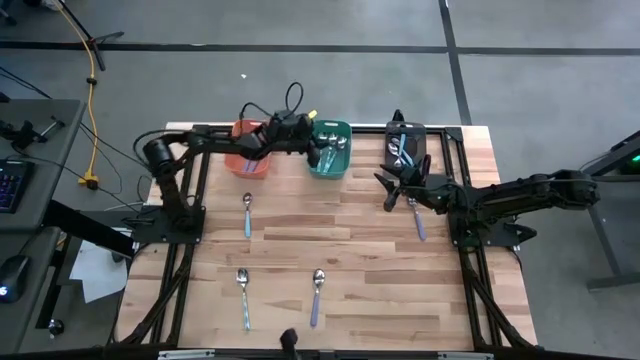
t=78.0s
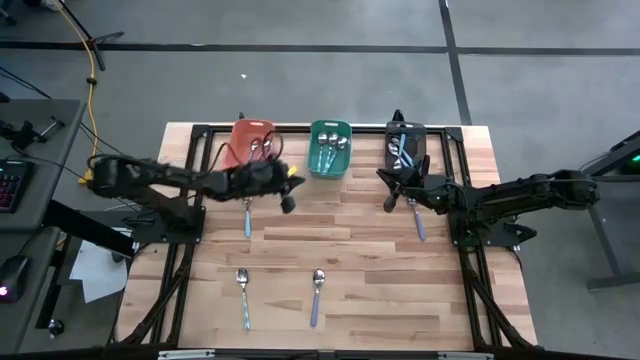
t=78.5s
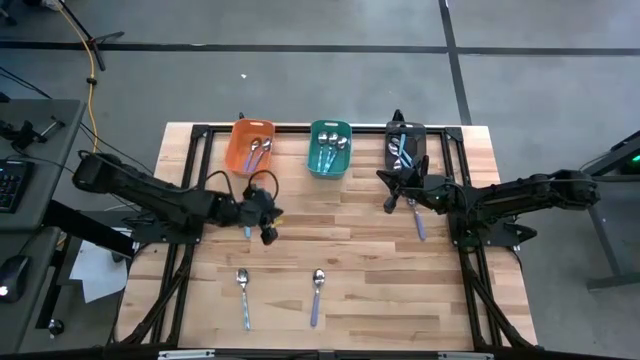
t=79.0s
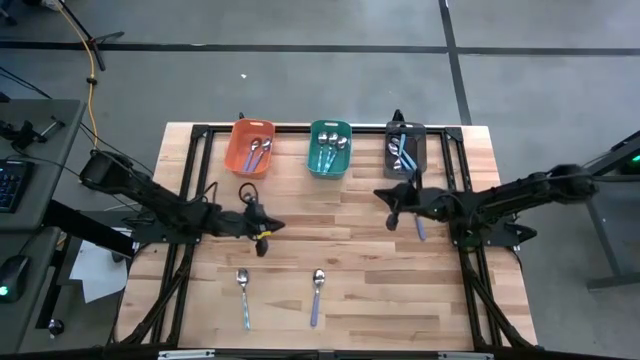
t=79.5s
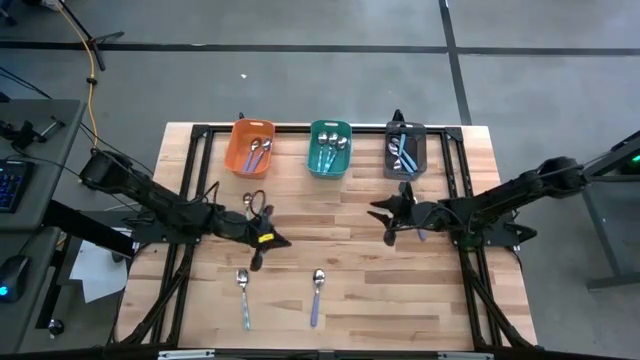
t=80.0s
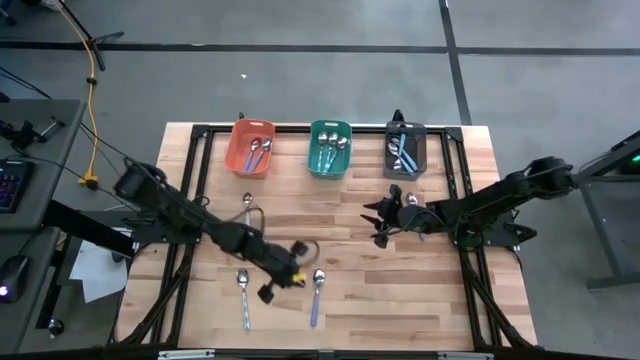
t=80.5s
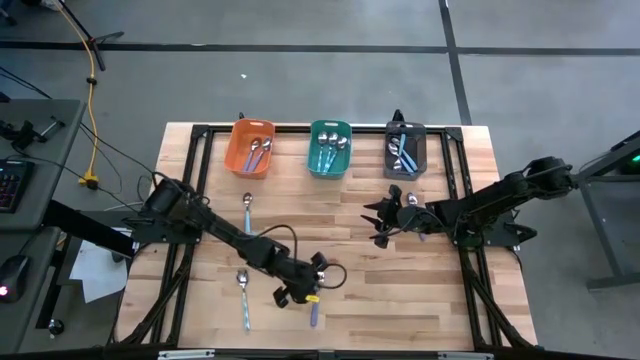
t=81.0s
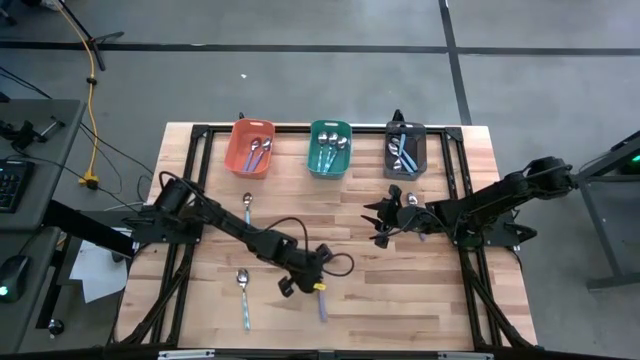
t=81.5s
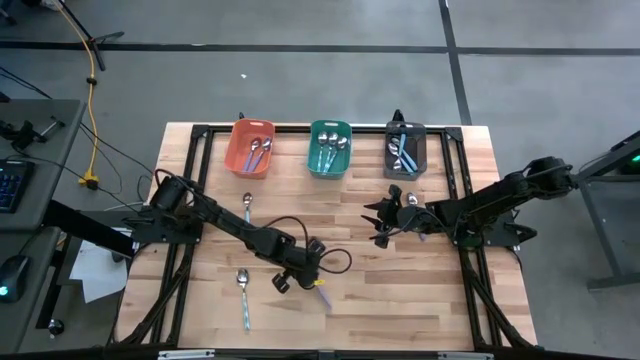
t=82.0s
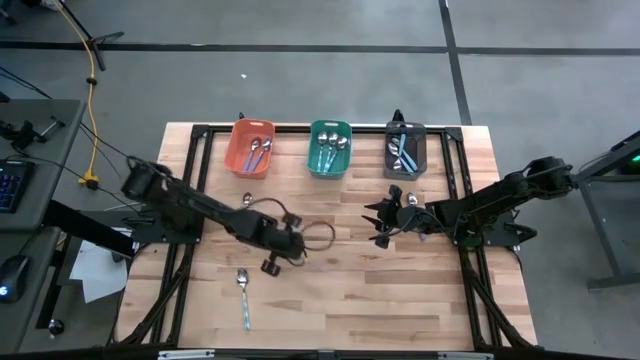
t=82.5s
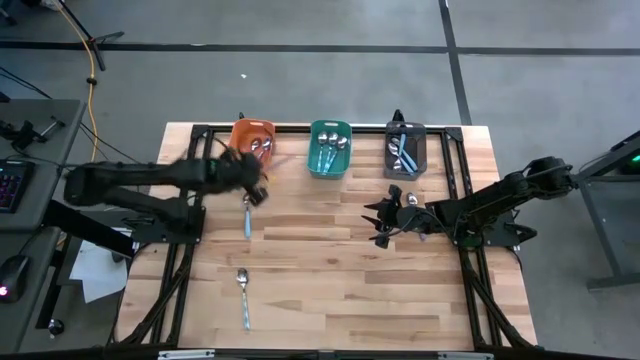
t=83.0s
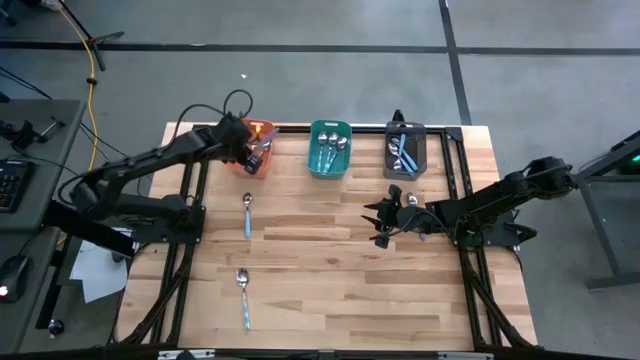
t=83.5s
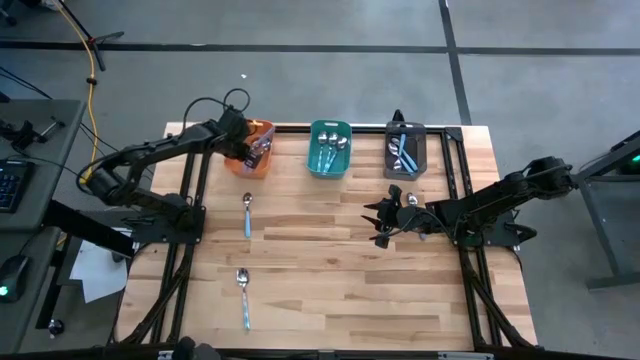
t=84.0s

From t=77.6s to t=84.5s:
Task: Sort silverware by color (type)
Put the purple spoon into the orange bin

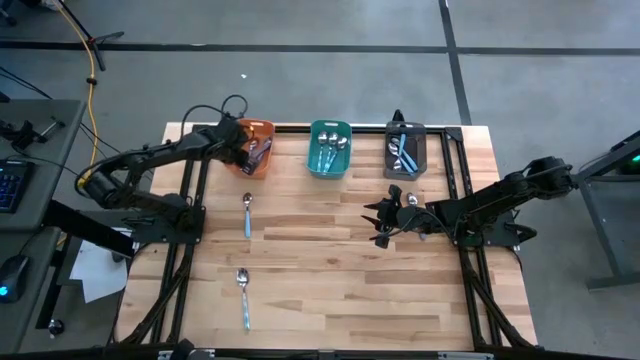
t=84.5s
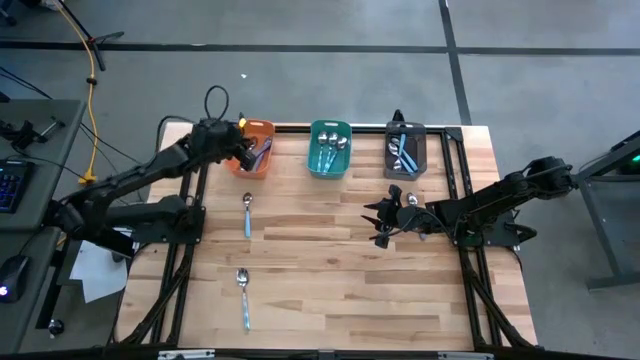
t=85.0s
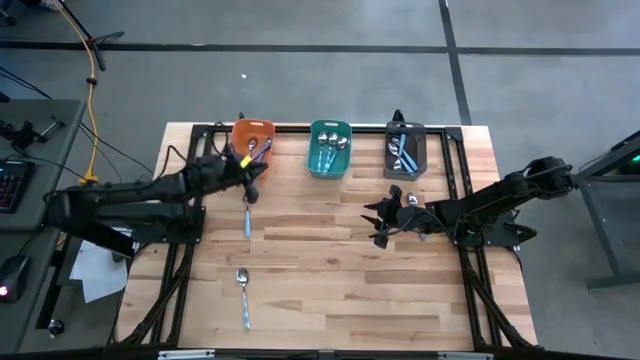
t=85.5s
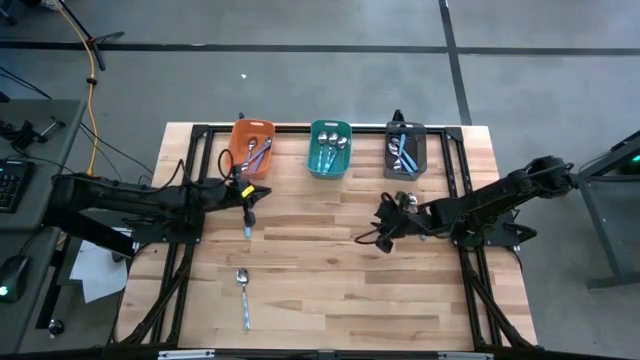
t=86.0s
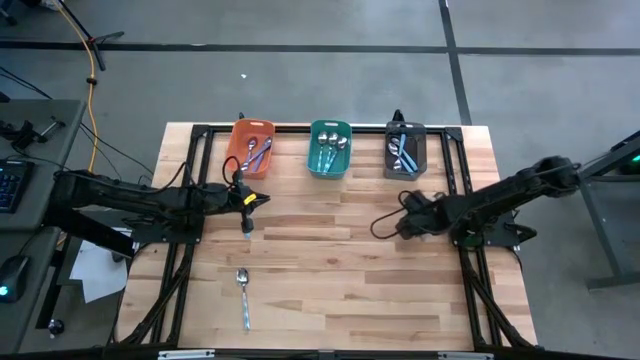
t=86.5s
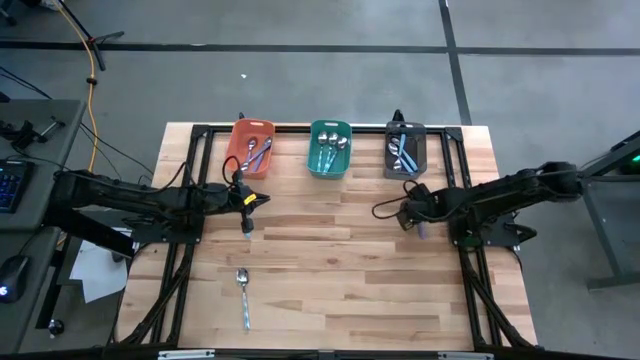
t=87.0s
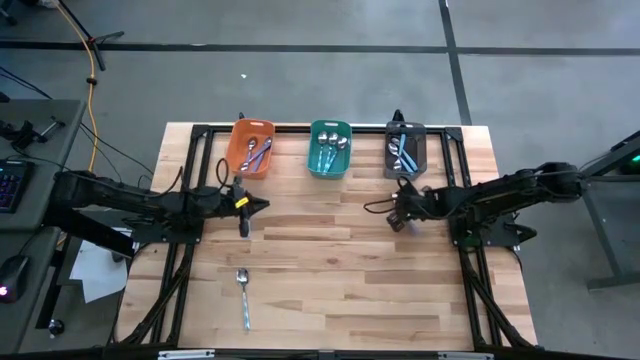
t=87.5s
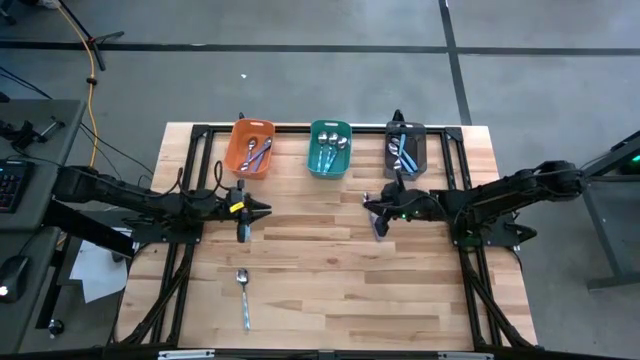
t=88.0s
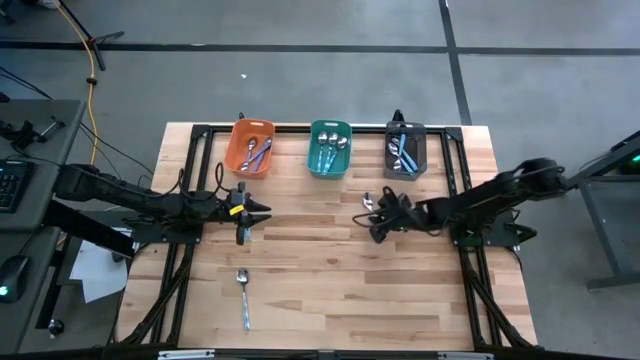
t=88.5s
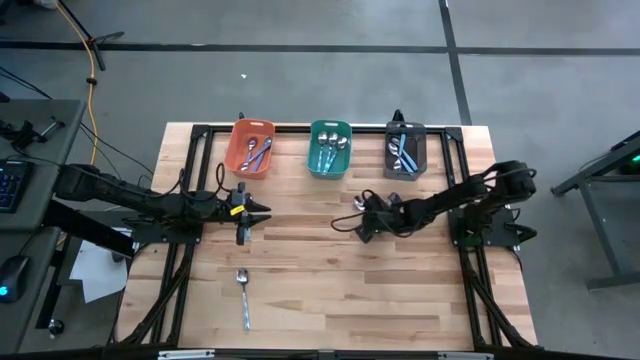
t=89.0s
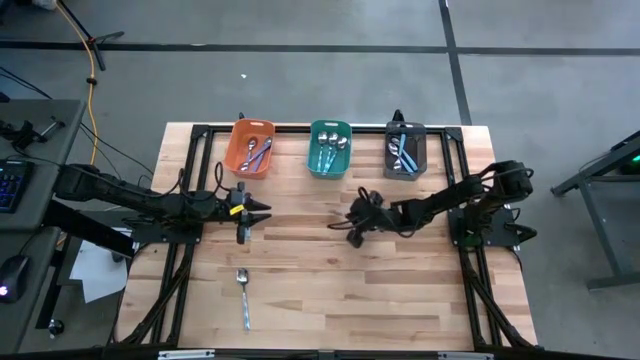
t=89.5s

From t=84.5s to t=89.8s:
Put the purple spoon into the orange bin

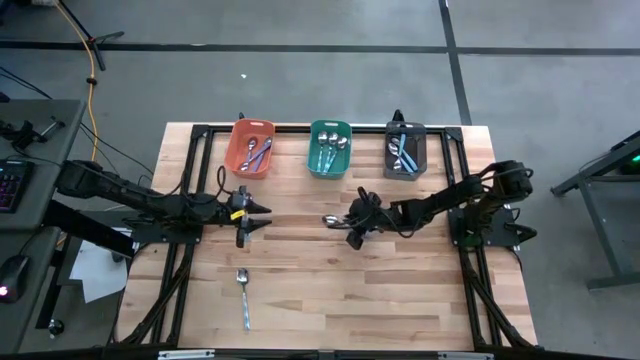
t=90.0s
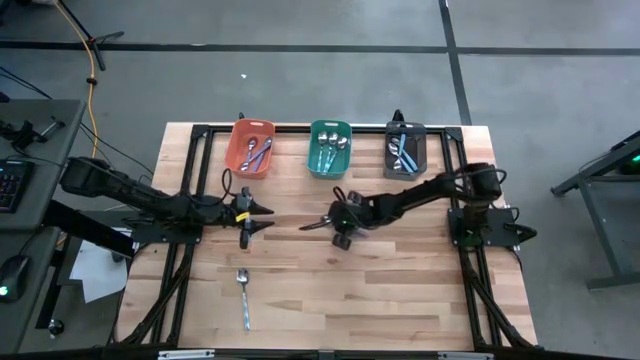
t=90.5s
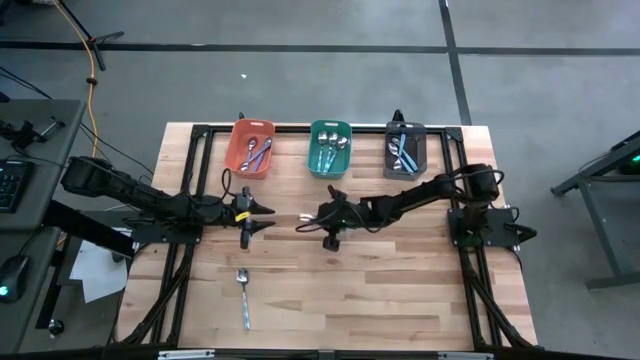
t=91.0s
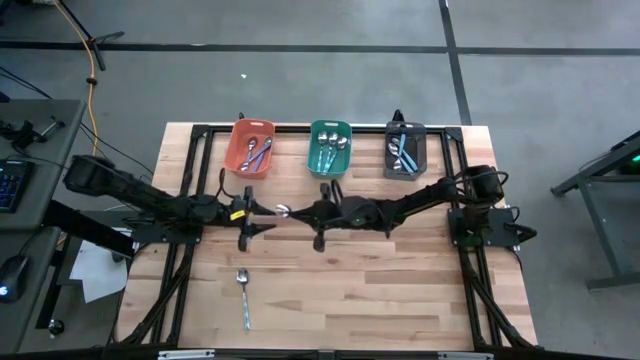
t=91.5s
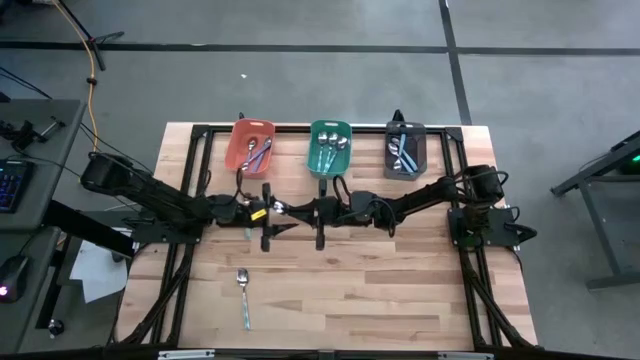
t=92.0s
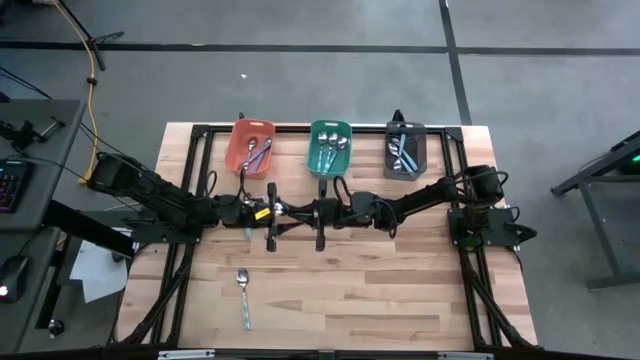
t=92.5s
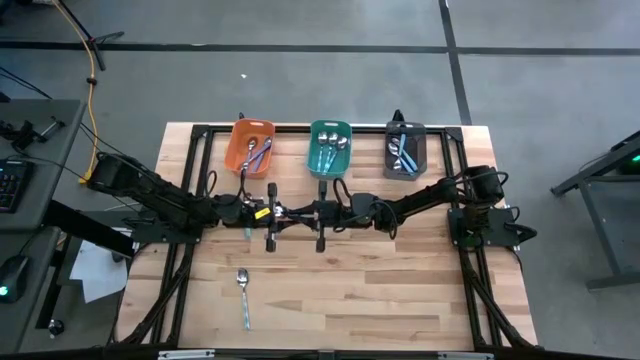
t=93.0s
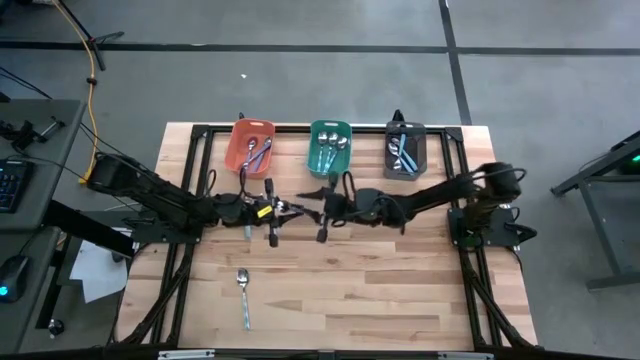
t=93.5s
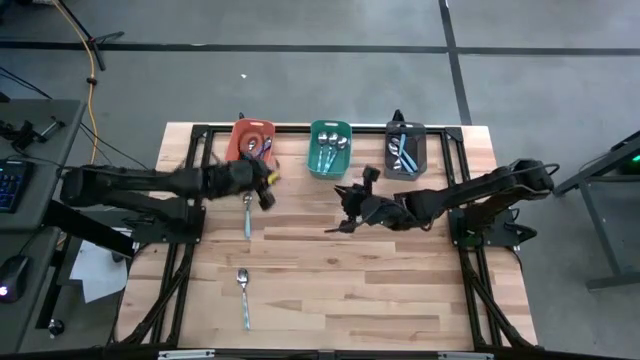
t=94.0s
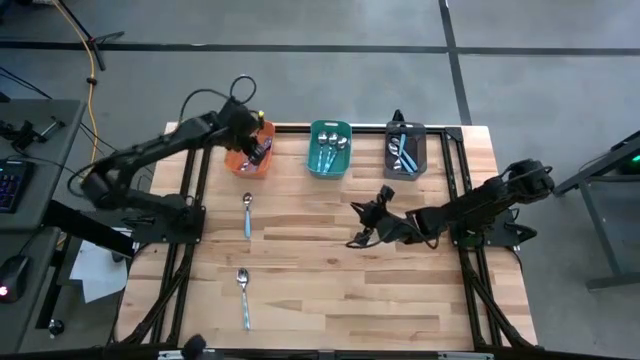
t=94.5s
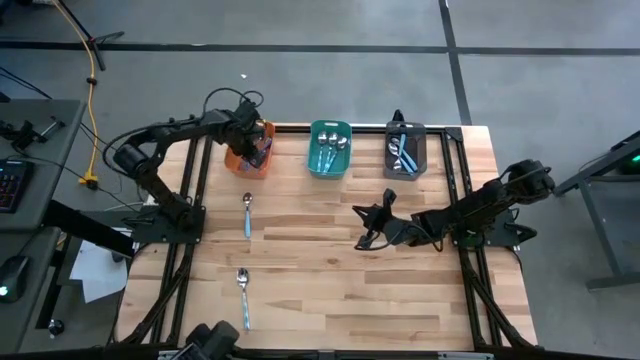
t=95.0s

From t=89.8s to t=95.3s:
Put the purple spoon into the orange bin

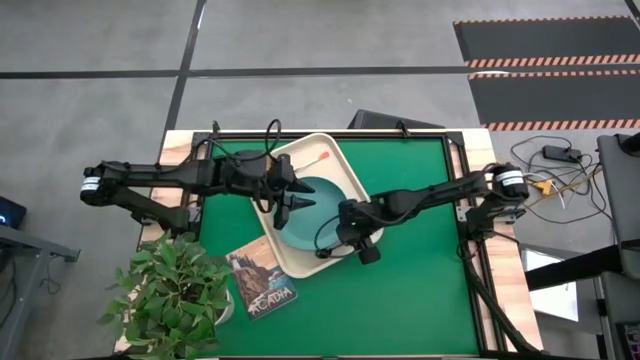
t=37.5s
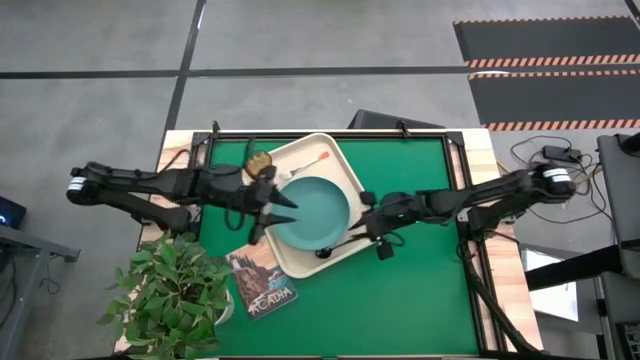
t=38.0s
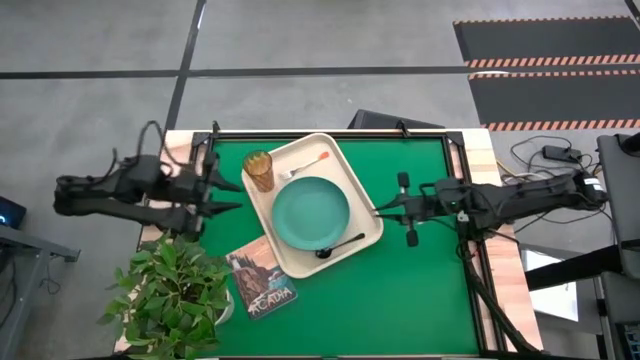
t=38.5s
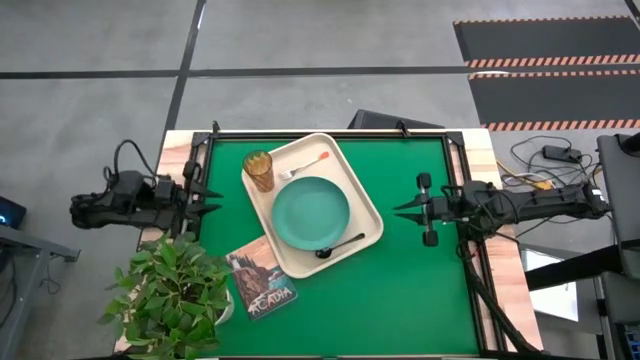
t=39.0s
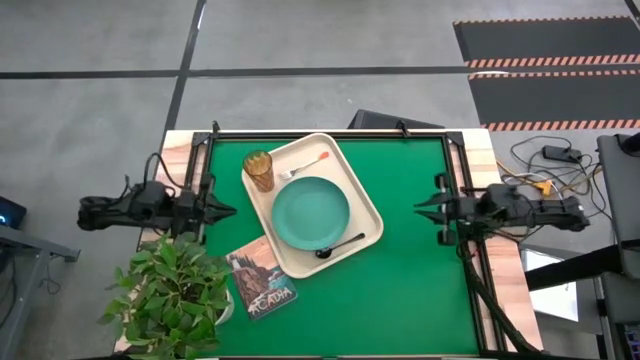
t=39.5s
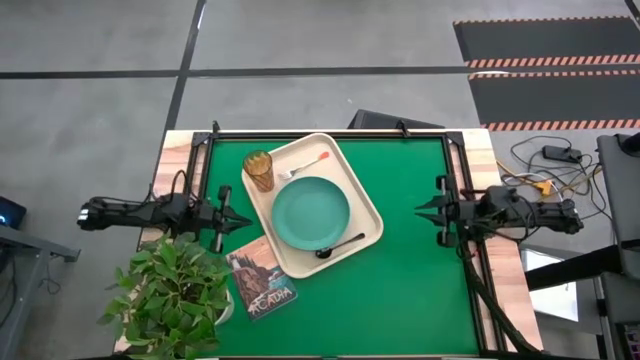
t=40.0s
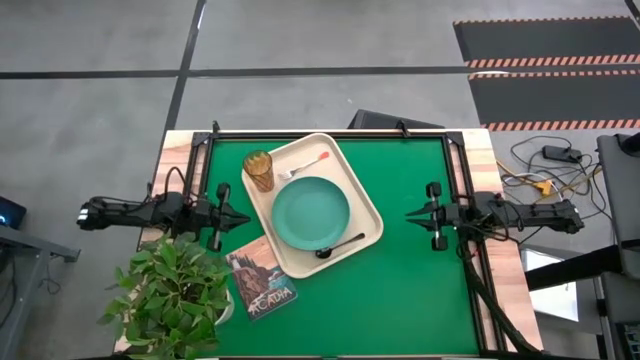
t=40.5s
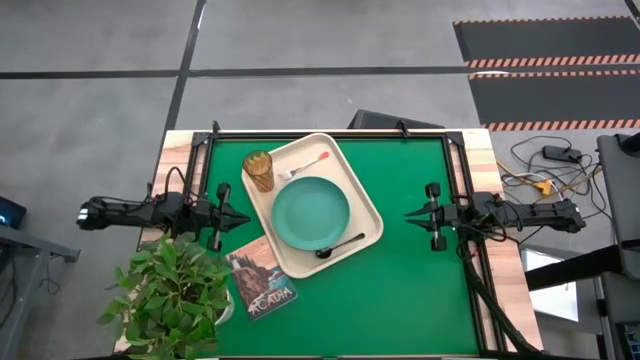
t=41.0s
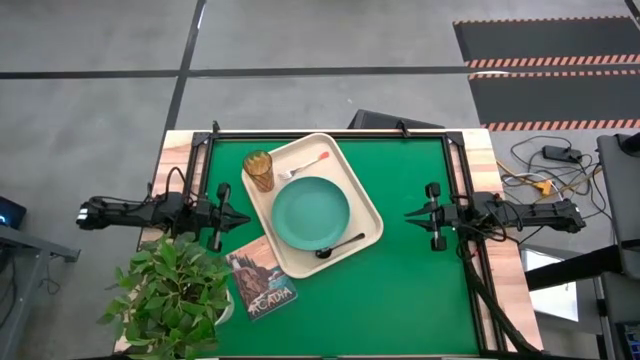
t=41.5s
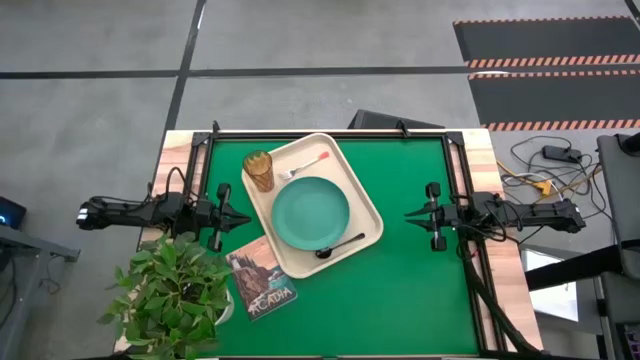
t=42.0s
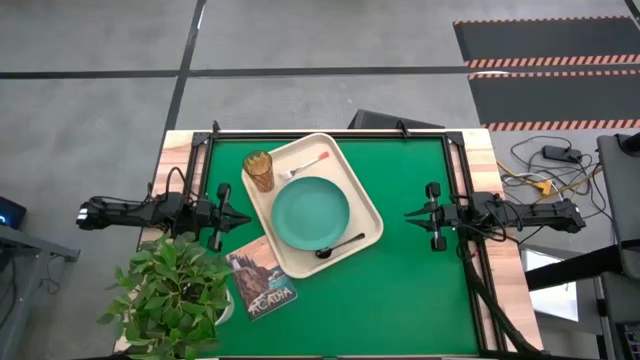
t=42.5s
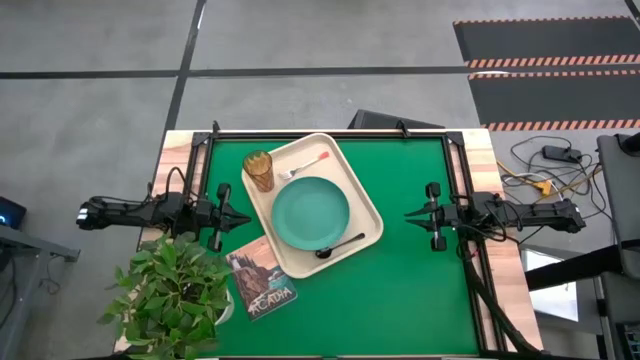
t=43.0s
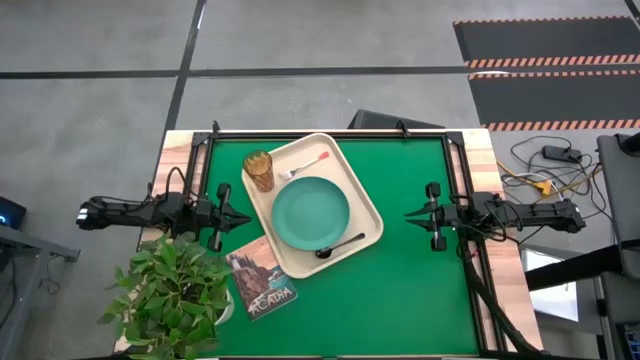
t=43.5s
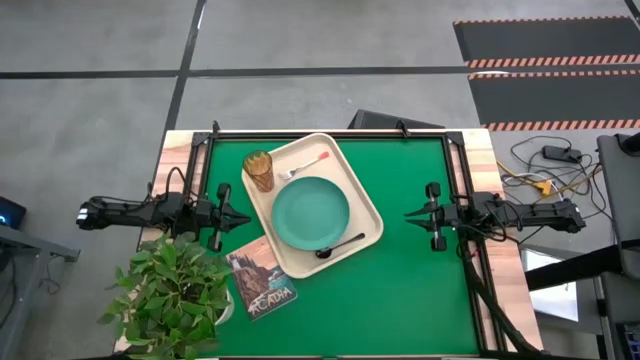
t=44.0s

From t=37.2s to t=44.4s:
Task: Pick and place plate/cup/fork/spoon on tray
Return to Home Position
